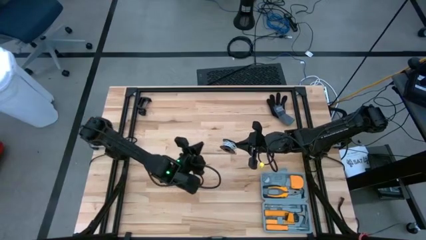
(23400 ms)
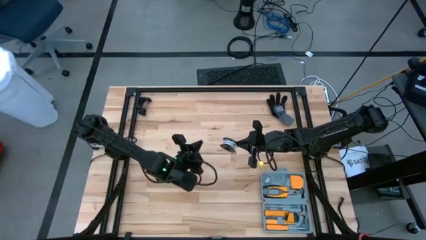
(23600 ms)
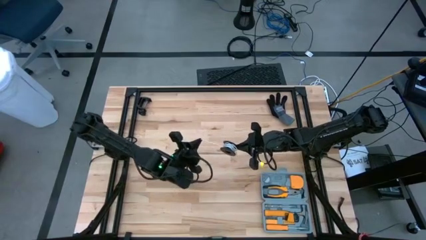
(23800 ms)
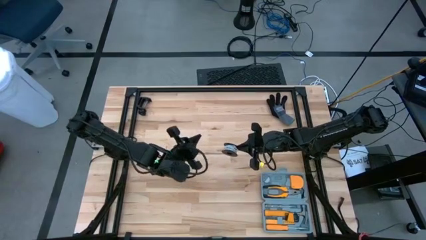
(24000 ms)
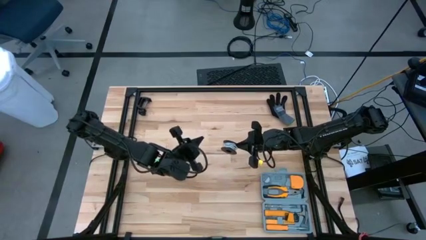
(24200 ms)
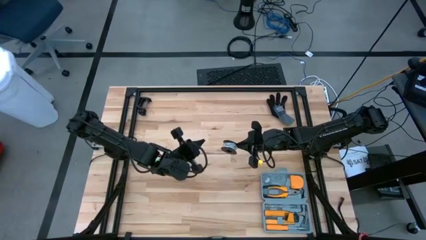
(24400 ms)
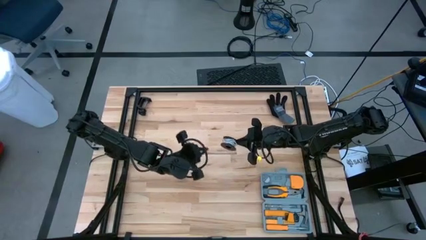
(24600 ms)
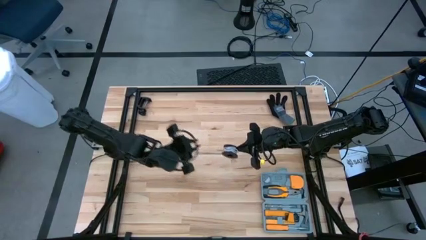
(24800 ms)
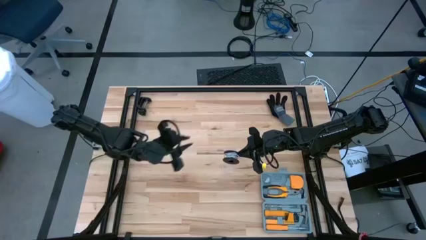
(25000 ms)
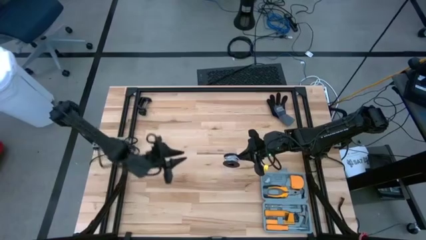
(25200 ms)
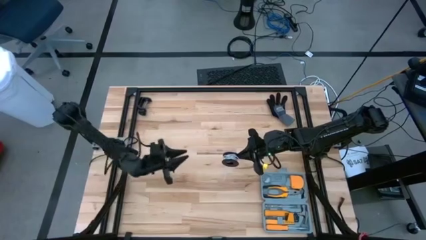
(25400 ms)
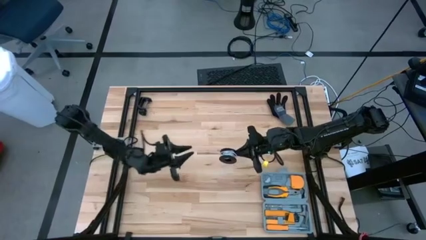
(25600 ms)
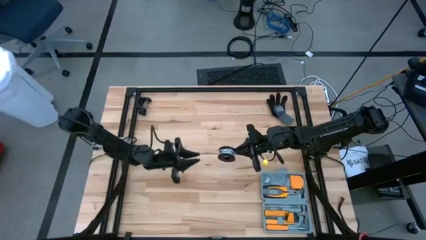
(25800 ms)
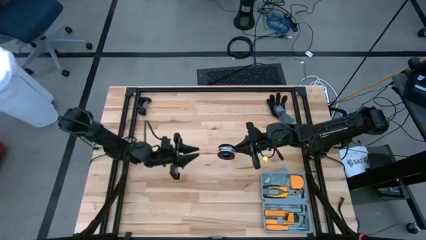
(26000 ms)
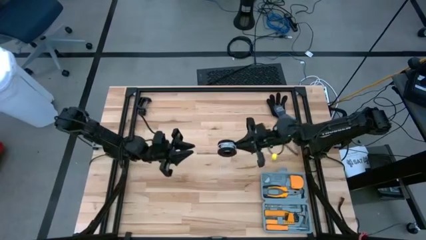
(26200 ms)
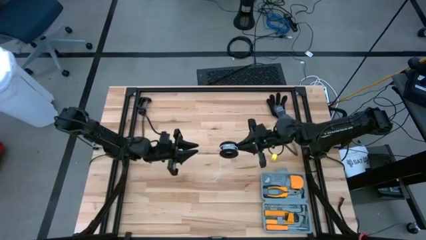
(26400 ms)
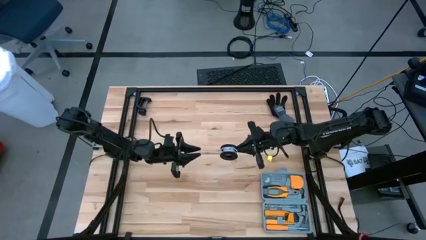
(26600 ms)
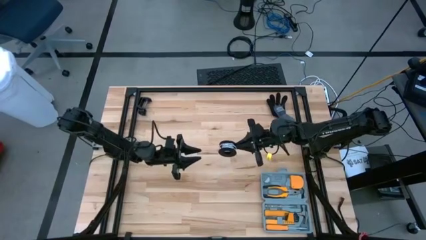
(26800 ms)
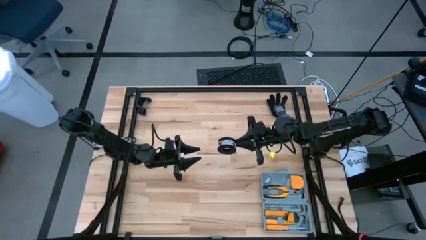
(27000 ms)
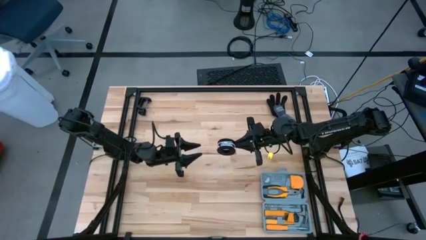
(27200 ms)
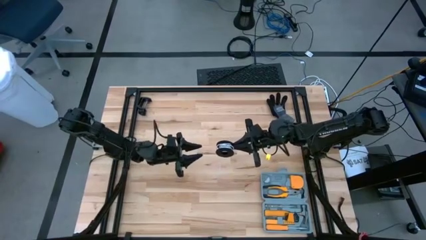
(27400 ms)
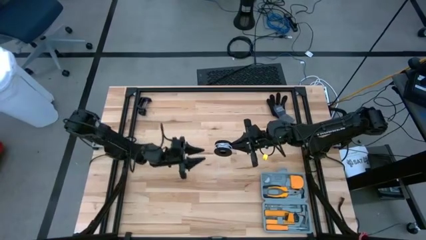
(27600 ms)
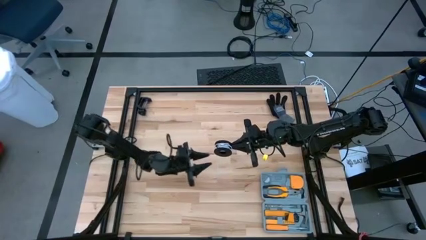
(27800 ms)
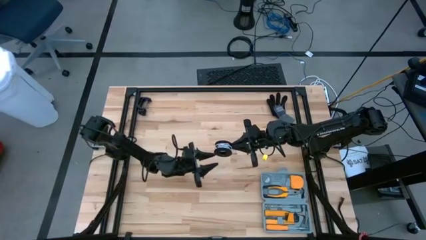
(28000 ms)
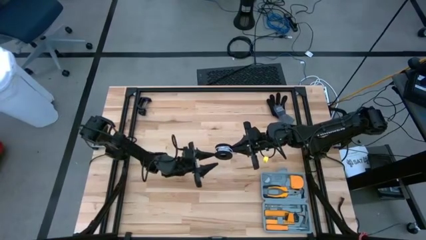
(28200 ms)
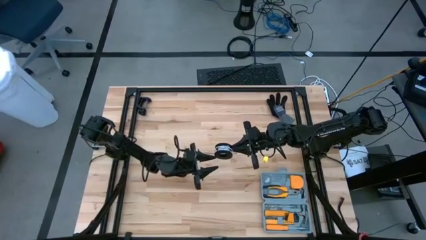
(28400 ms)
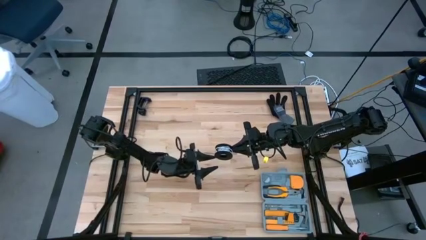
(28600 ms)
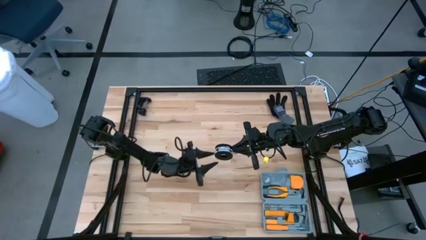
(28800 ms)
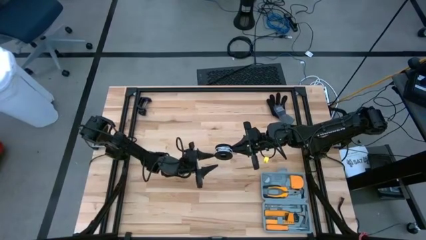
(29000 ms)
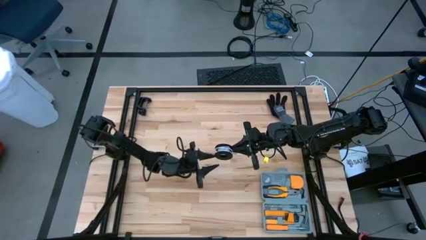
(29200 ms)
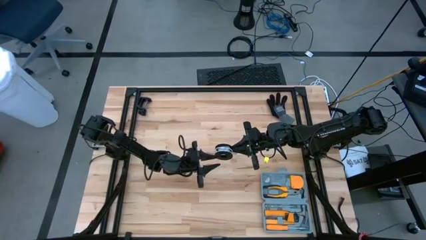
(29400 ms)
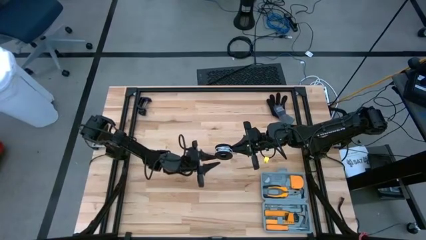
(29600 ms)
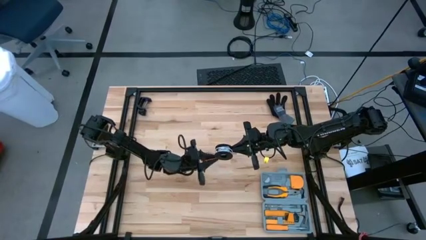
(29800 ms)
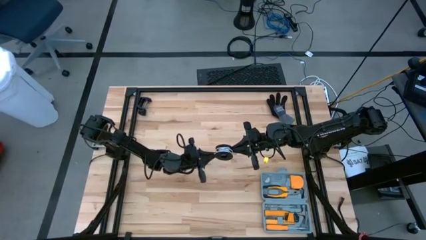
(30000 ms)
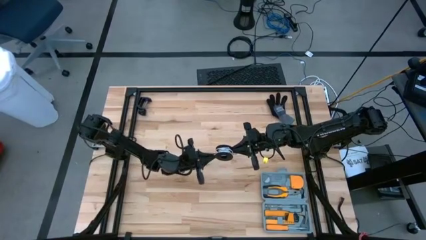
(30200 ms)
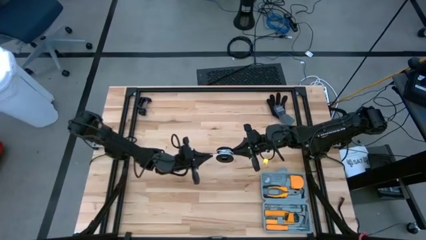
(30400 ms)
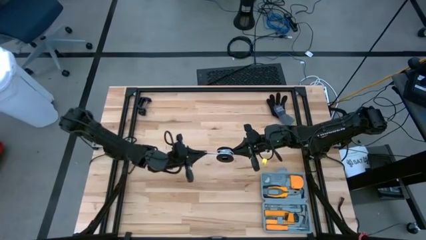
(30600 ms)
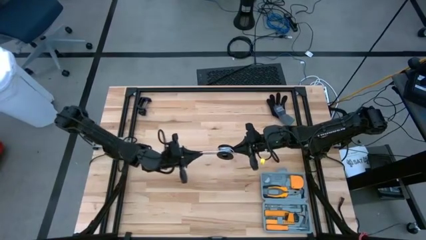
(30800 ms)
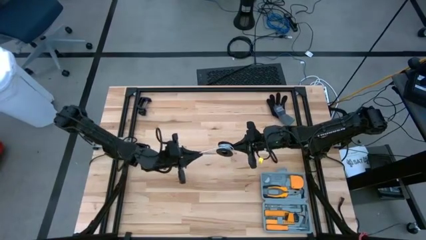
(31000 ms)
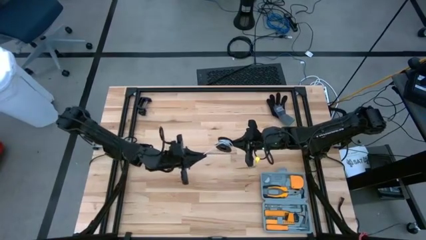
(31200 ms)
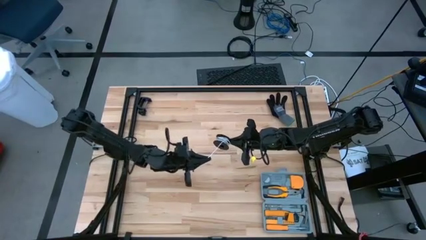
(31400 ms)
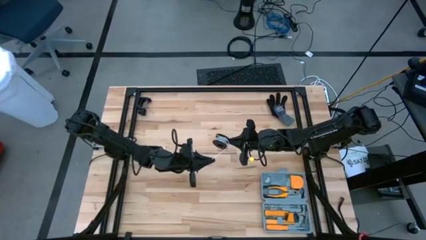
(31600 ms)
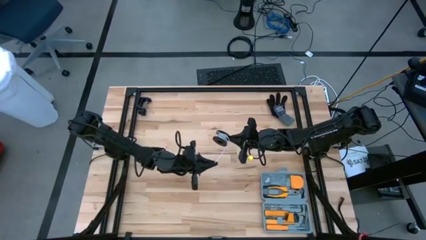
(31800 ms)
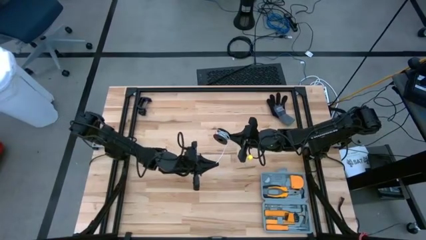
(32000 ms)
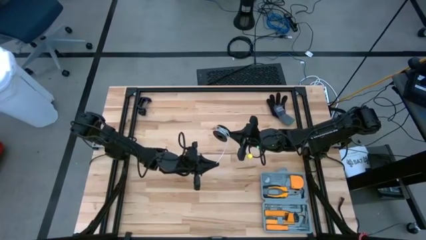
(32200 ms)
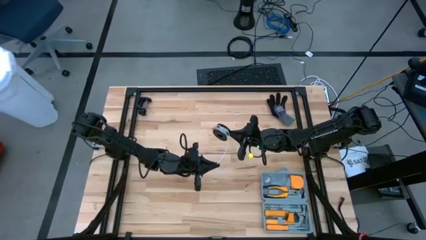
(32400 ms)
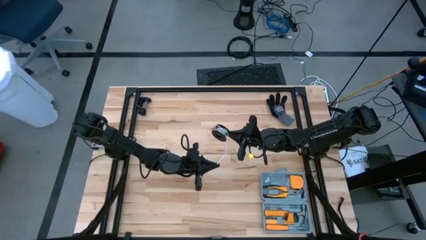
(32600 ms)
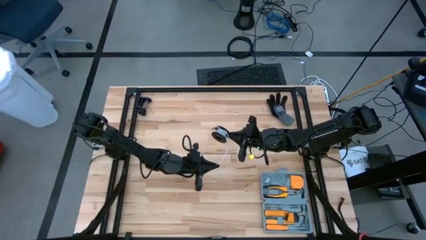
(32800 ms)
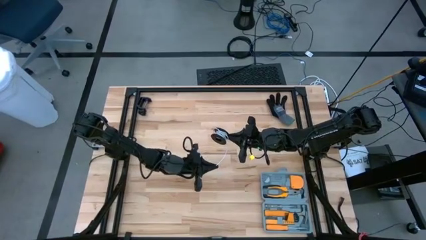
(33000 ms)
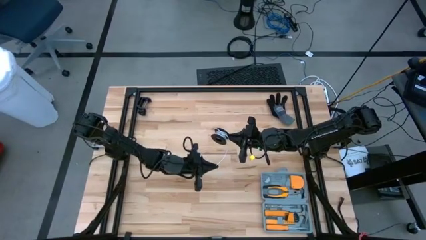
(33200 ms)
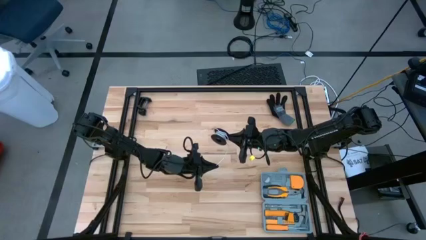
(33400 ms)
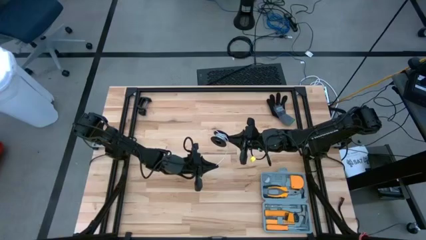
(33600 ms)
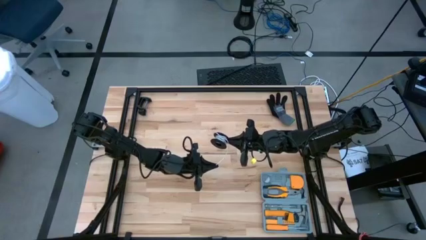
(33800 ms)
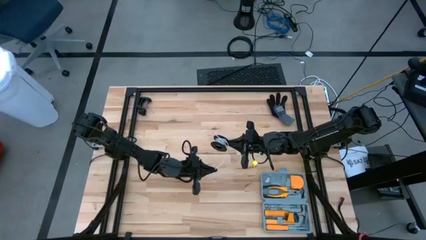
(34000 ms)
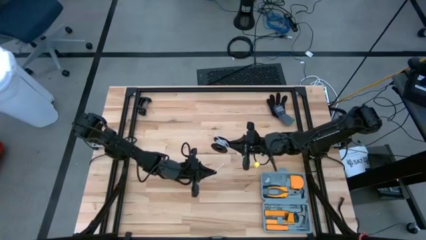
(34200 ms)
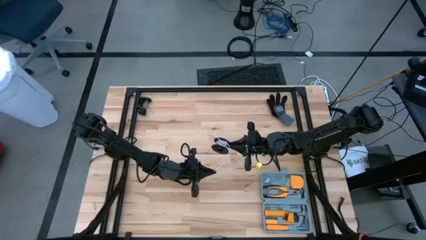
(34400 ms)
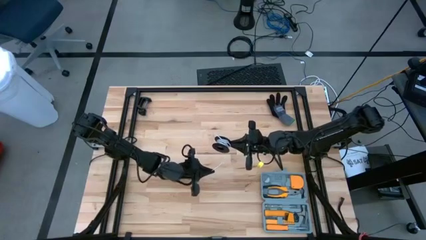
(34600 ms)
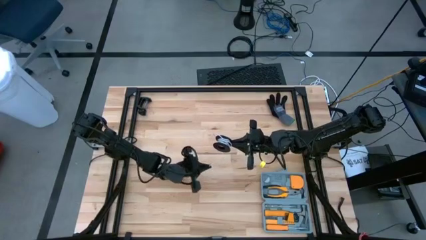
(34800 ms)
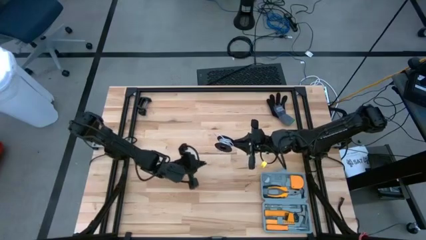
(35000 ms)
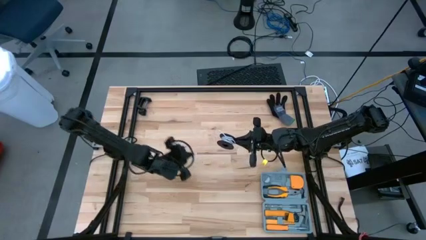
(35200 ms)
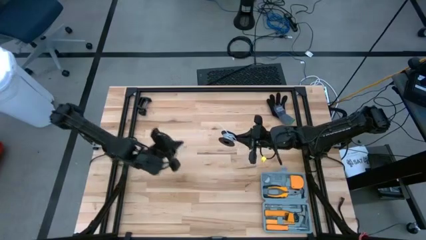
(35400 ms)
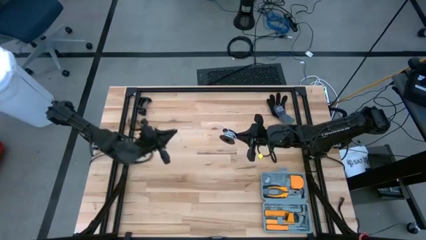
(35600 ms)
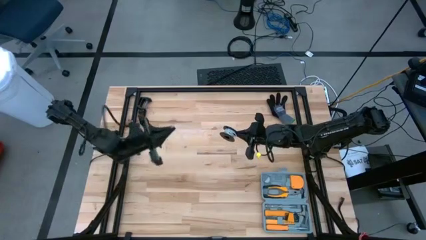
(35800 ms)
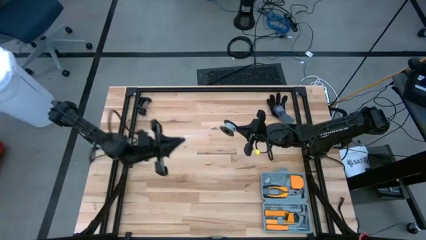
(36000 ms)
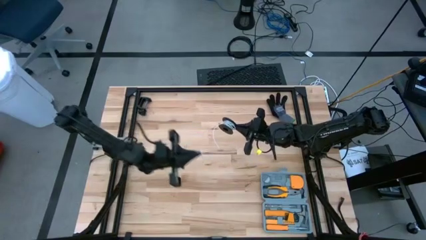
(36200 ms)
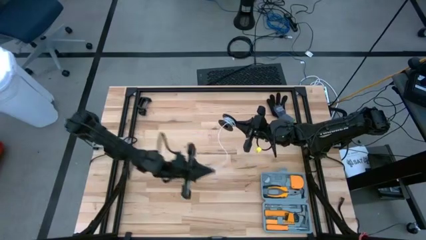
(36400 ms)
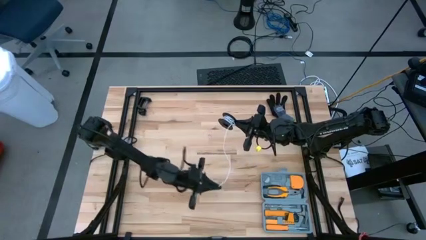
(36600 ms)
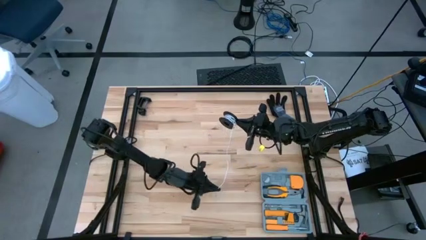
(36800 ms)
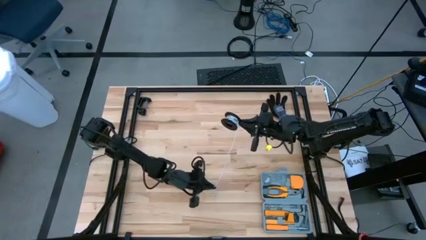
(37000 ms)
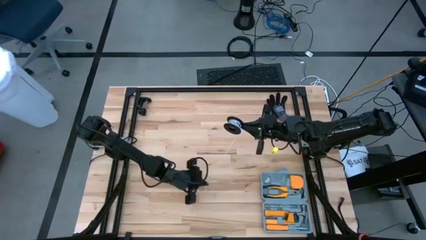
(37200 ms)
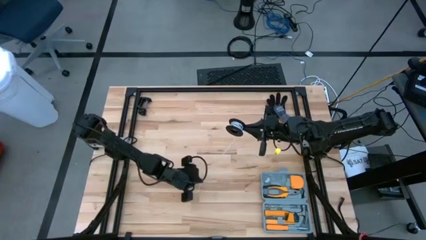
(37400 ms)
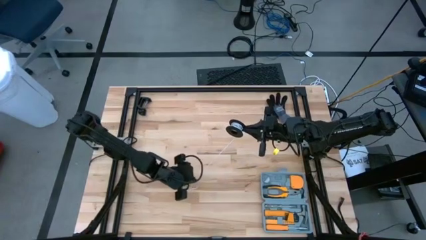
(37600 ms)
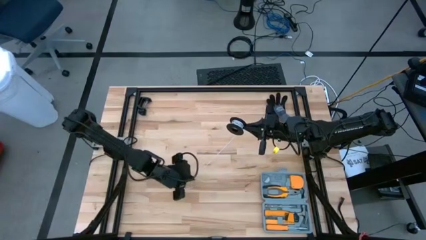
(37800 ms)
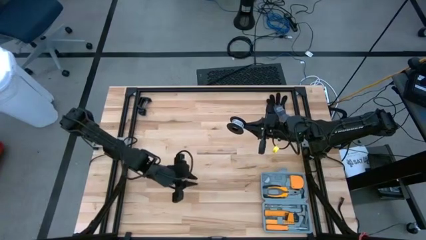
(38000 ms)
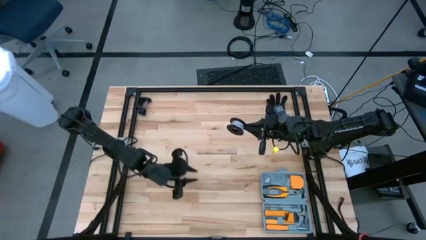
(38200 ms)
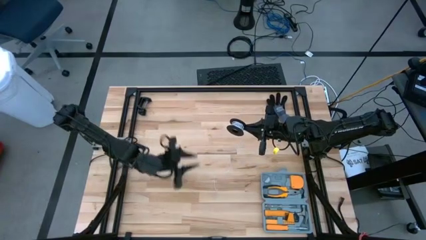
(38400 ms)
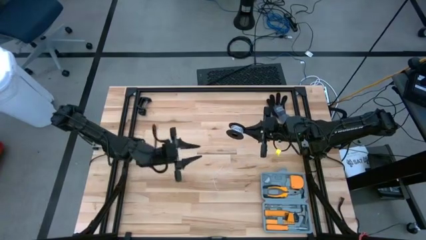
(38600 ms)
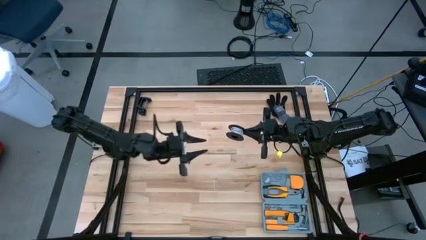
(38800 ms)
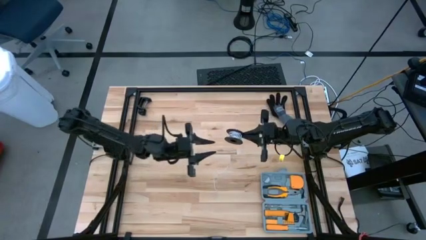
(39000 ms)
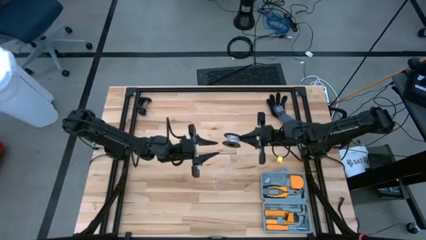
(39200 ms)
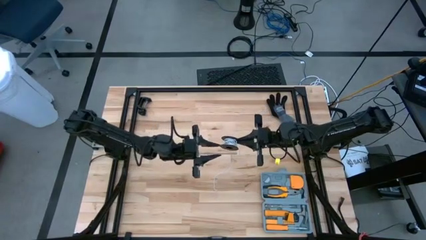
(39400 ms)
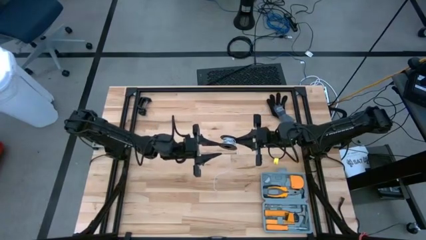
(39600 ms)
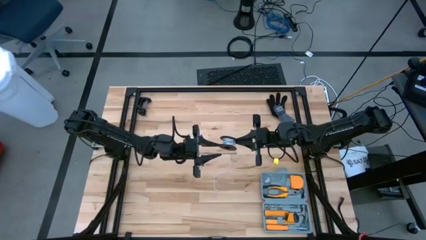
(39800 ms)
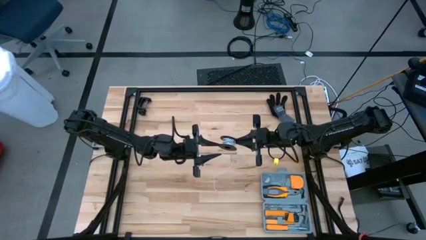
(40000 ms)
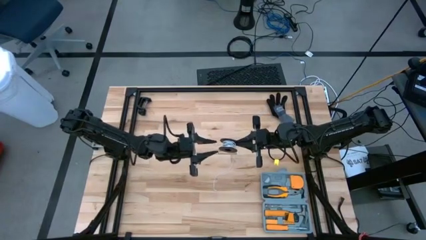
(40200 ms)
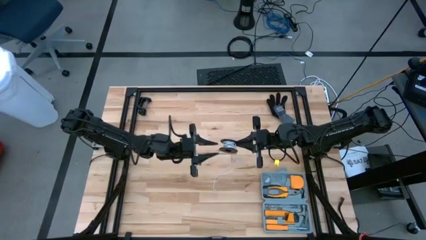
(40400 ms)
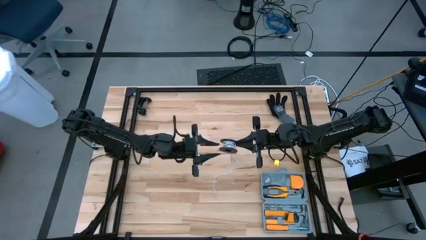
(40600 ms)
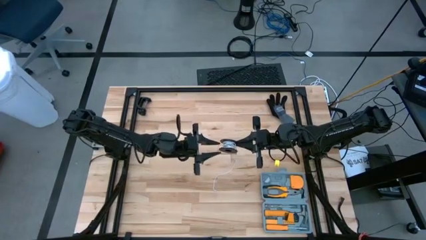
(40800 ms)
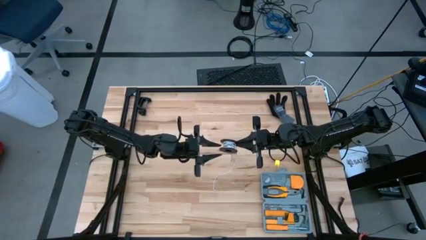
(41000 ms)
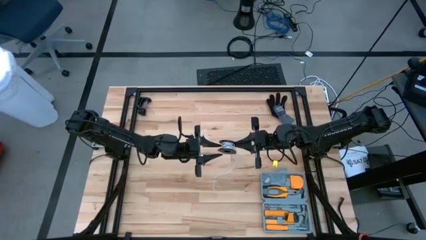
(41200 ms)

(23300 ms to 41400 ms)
Task: Coil cords
Uncoil the white cable wire from the spool
